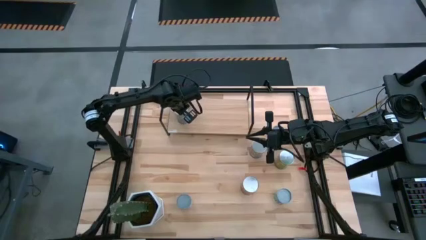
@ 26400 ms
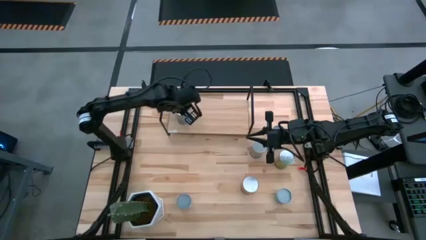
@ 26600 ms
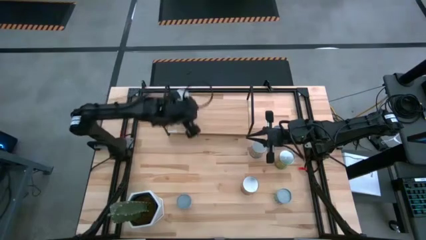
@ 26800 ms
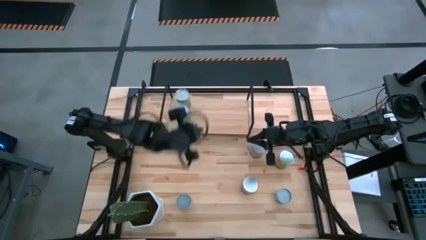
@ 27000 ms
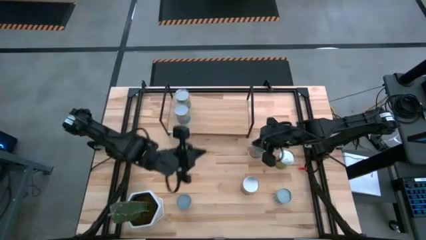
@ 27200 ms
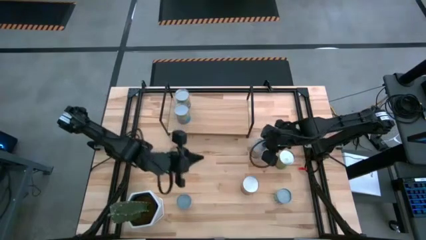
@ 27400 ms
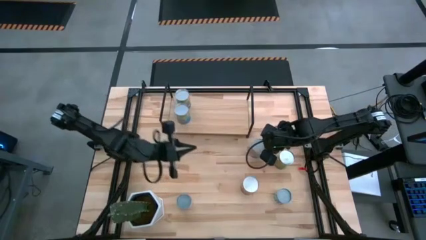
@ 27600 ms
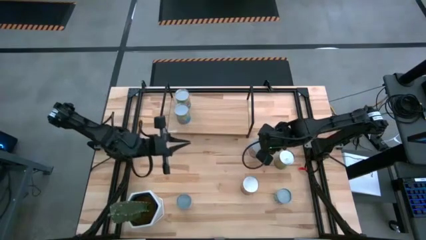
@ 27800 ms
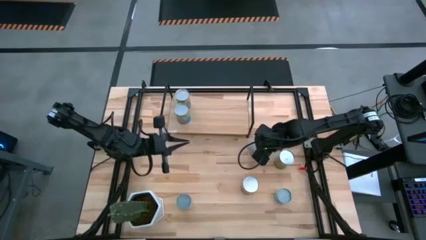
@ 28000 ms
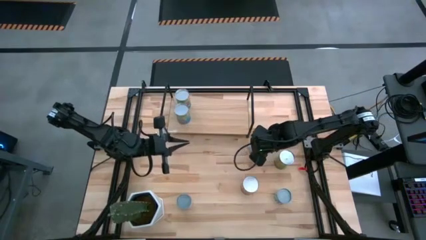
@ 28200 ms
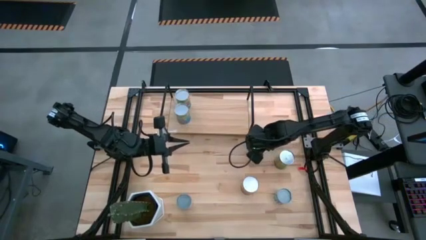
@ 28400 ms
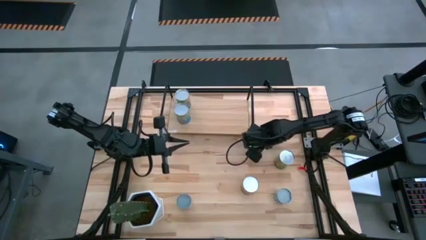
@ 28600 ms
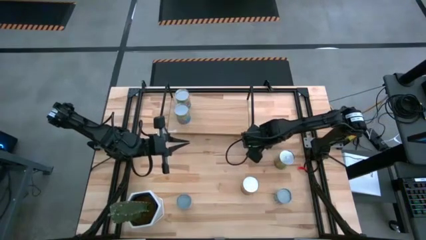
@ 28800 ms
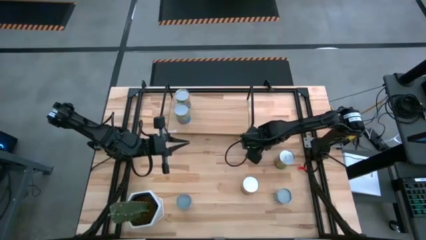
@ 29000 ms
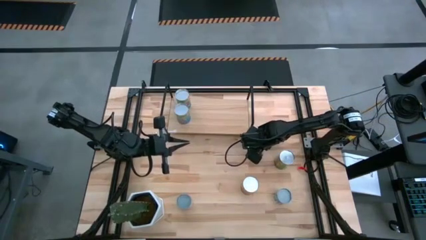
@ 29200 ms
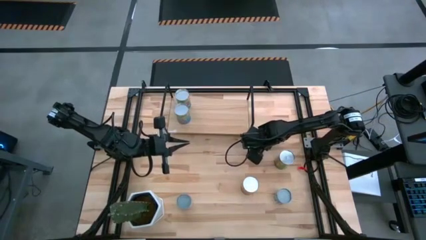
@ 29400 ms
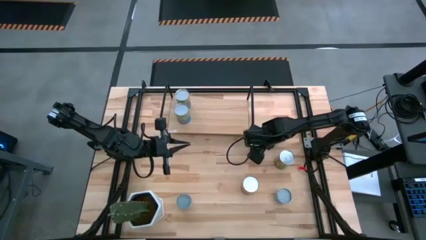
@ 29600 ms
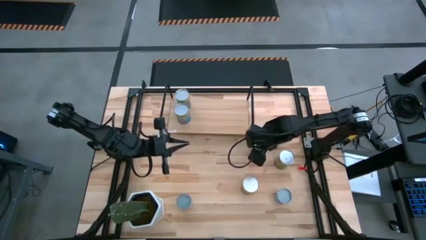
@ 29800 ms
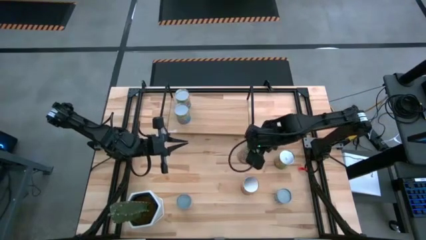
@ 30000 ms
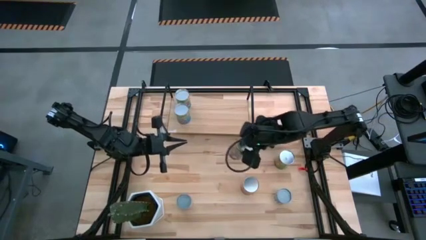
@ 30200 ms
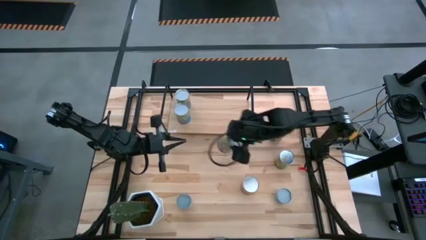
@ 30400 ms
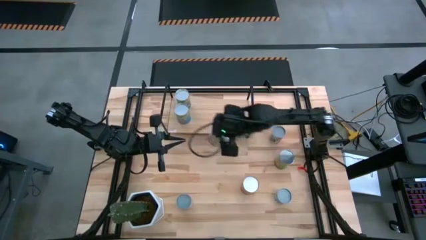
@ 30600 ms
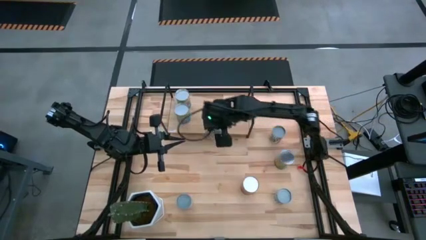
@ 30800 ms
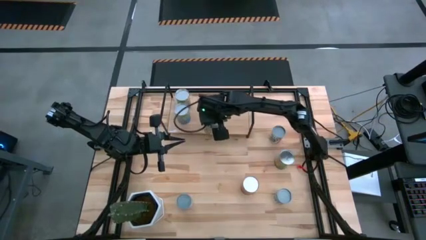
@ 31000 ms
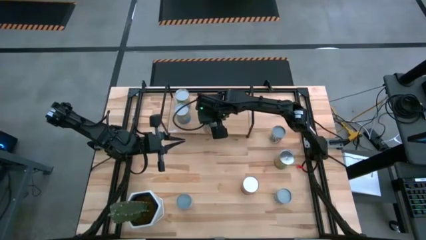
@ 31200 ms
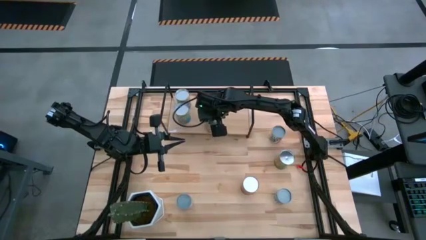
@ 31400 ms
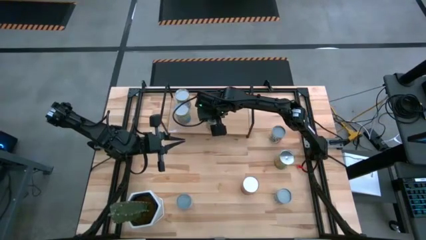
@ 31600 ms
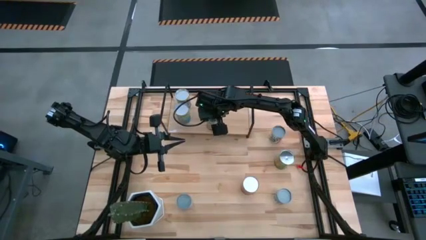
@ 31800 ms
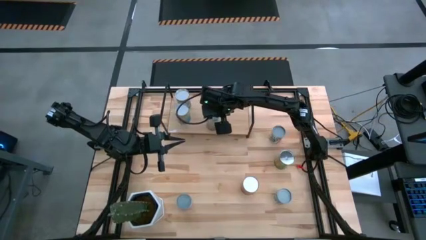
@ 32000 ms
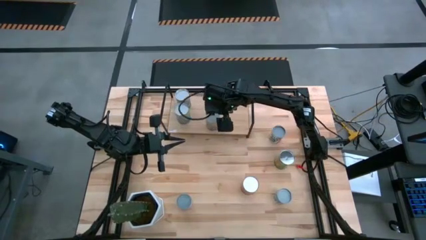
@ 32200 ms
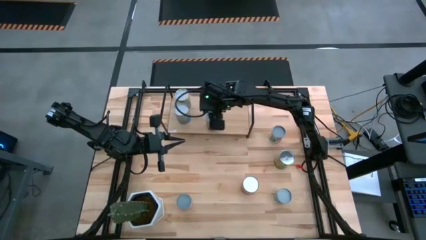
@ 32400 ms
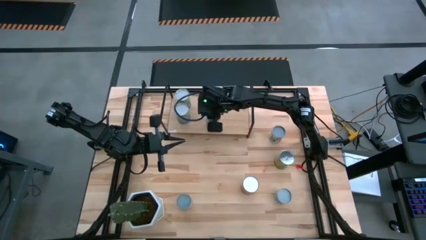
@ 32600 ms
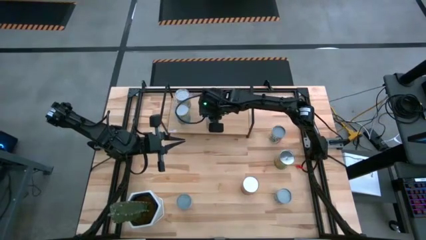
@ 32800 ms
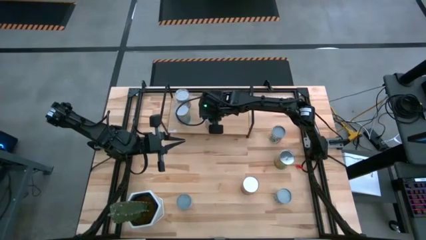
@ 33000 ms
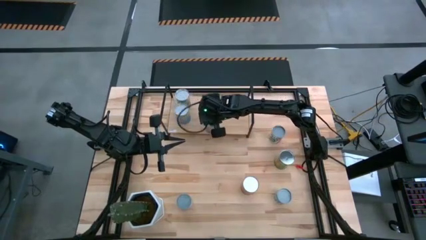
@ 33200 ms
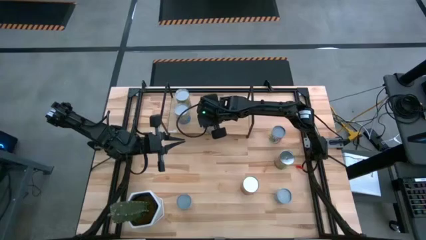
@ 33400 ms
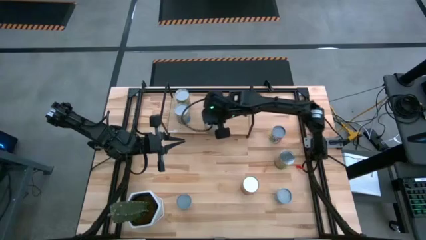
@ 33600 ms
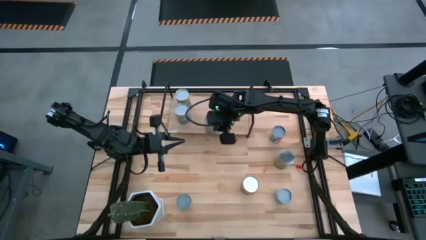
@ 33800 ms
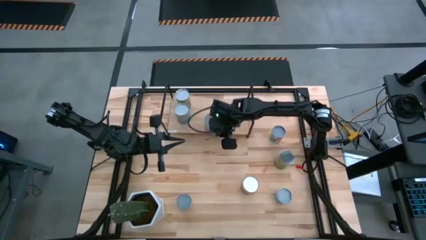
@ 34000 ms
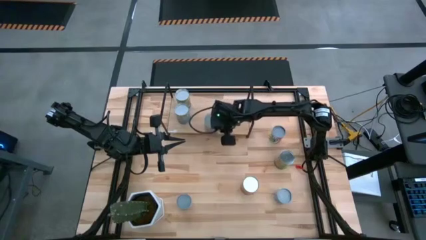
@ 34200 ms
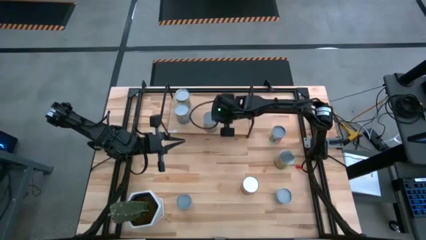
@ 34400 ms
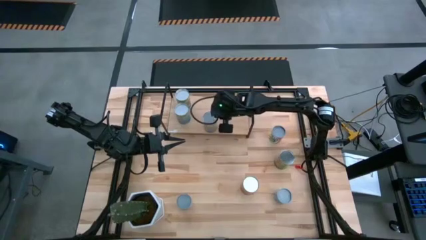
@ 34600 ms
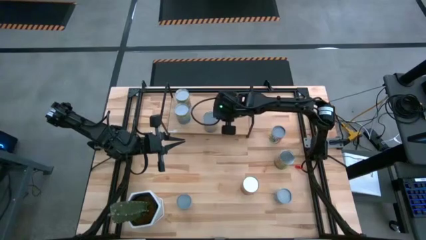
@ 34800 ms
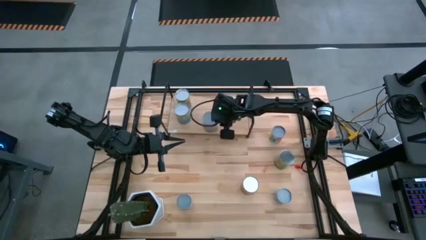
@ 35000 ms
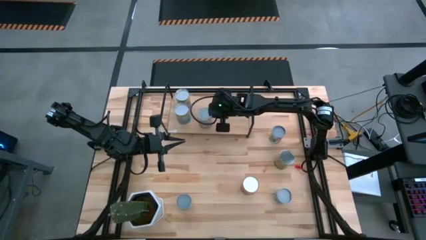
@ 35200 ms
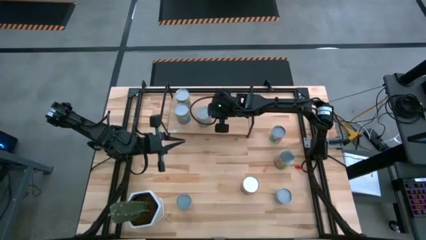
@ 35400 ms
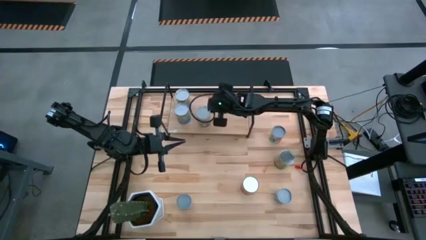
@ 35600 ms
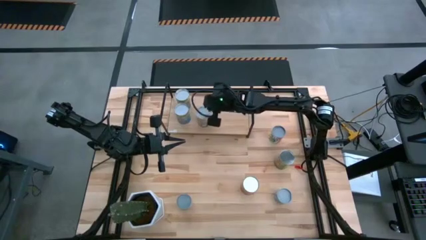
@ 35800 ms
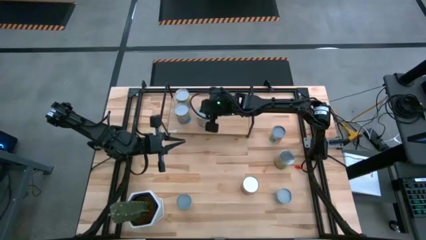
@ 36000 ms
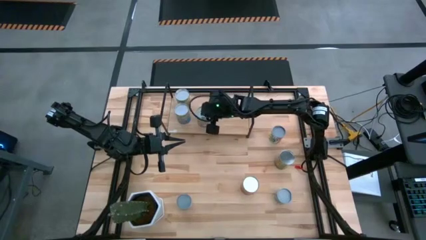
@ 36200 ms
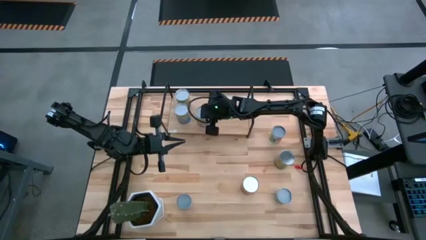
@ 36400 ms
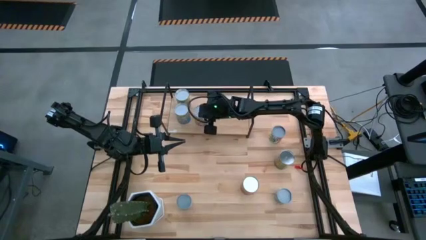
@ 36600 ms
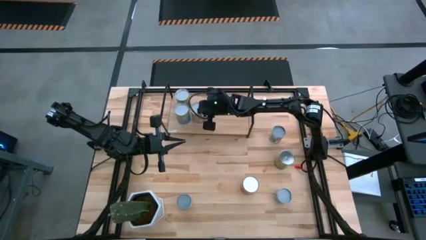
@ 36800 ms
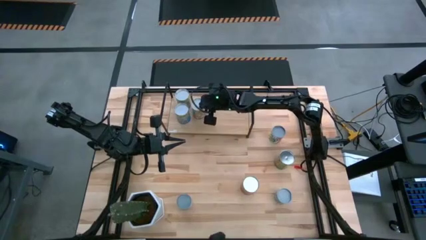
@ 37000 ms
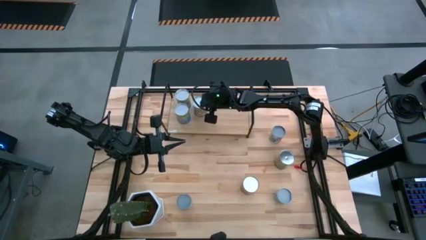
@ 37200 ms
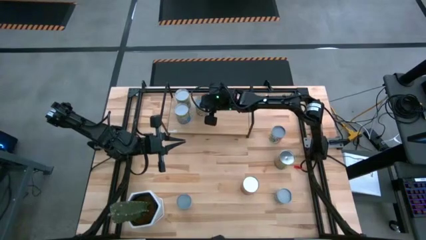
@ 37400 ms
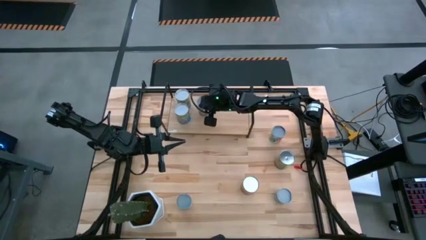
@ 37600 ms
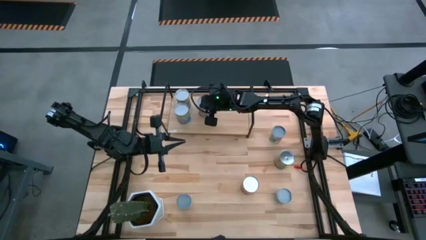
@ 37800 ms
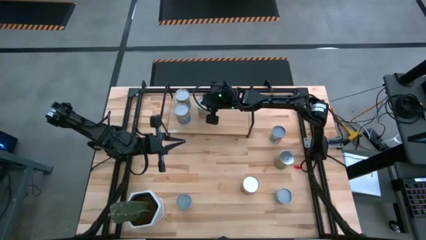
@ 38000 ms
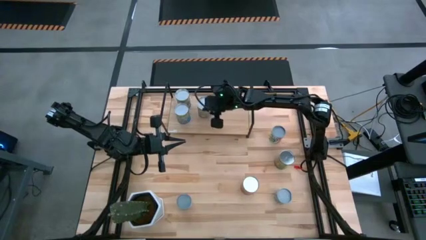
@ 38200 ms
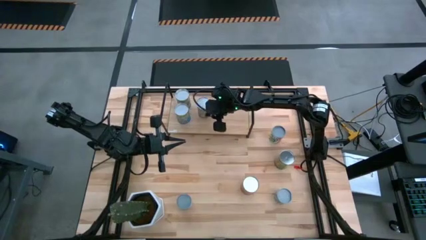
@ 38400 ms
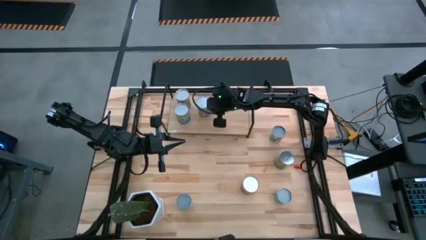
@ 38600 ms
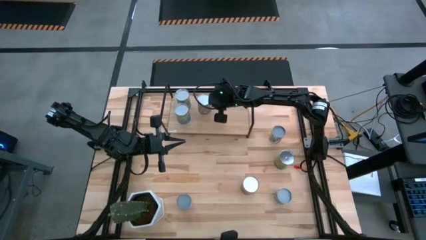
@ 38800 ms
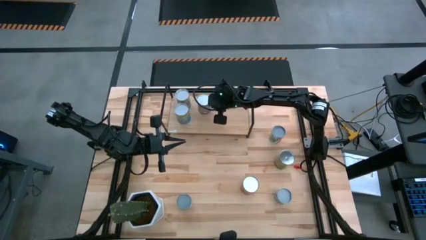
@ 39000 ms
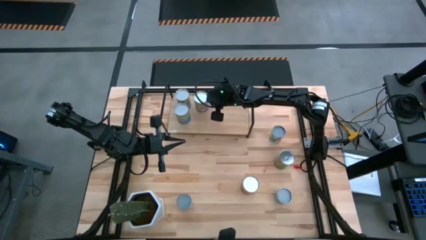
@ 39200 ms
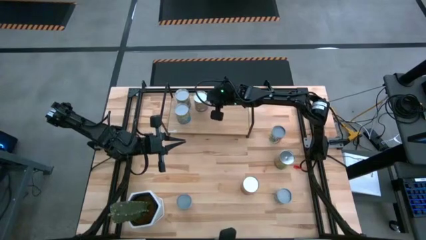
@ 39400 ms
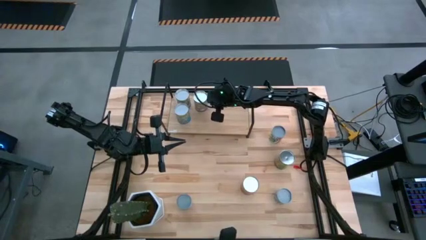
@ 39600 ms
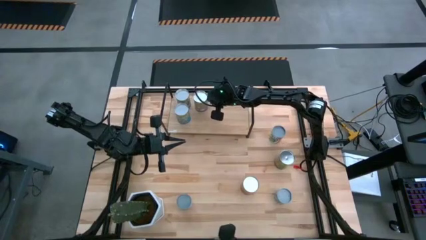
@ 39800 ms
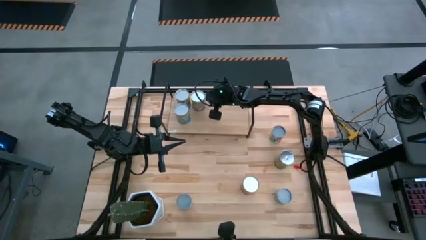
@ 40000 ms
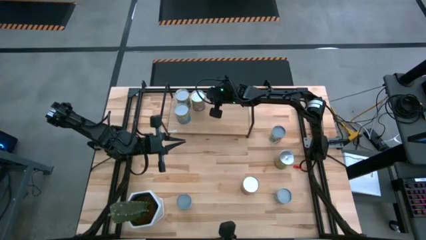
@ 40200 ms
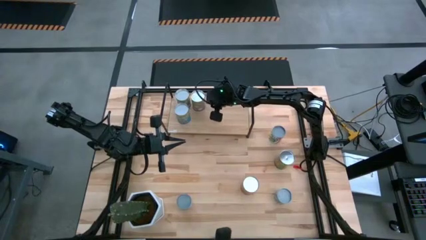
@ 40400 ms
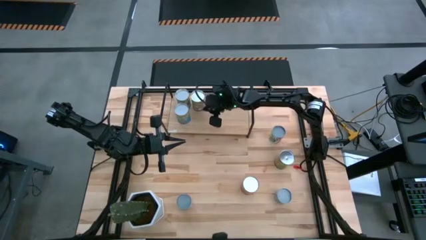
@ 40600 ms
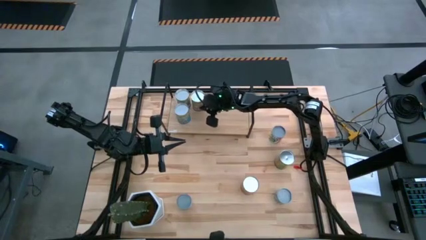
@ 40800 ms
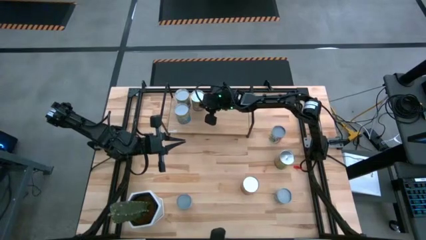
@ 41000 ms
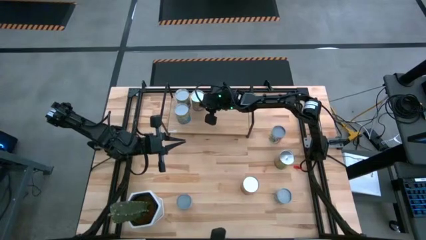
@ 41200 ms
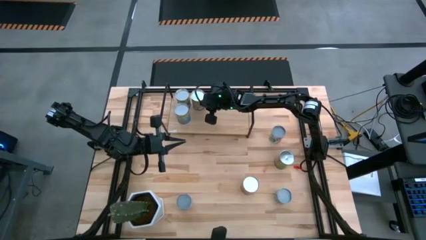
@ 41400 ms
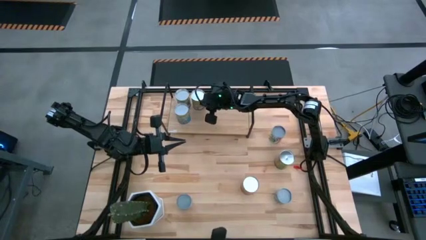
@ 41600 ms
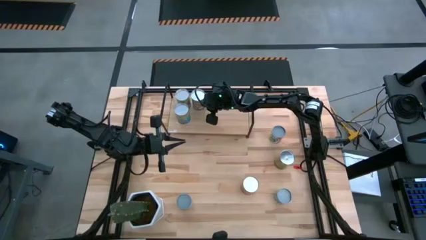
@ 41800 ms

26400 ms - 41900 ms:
Task: Pick and place cans onto a shelf
Put the canned peaches on the shelf
